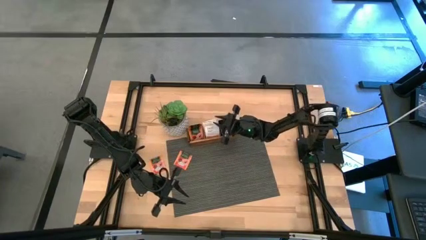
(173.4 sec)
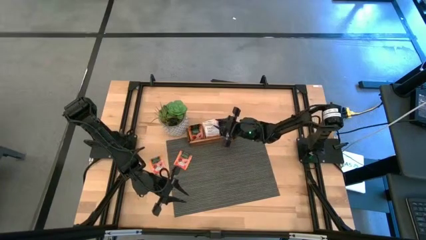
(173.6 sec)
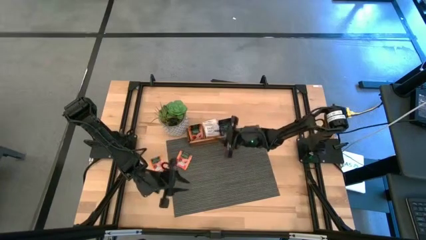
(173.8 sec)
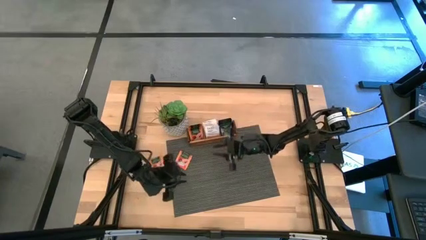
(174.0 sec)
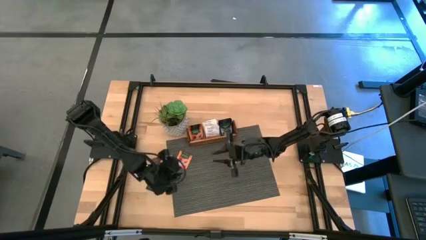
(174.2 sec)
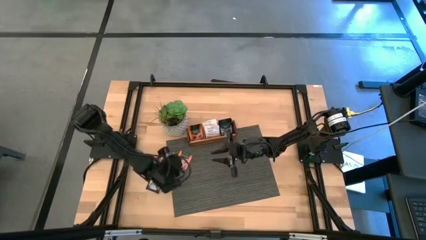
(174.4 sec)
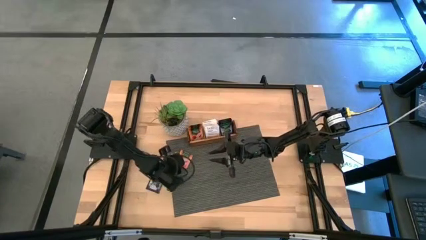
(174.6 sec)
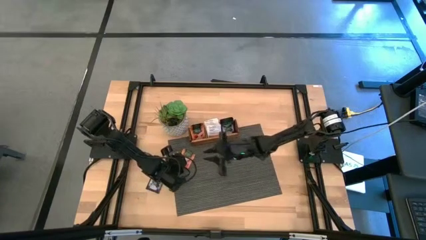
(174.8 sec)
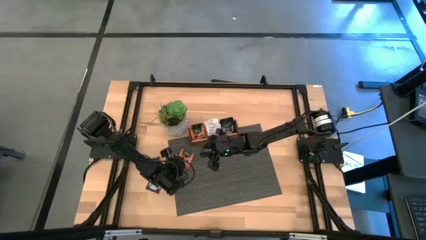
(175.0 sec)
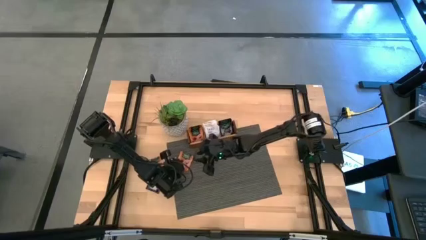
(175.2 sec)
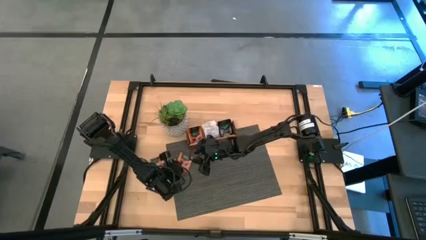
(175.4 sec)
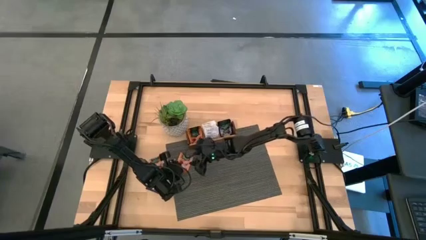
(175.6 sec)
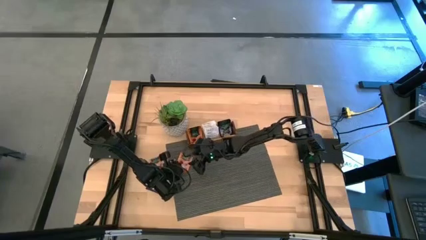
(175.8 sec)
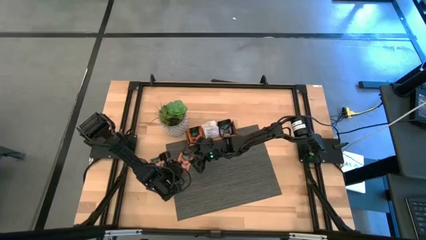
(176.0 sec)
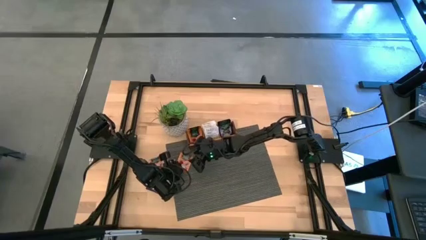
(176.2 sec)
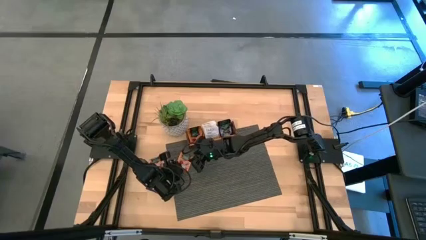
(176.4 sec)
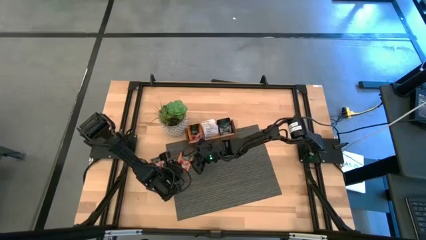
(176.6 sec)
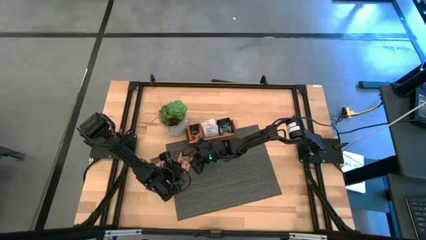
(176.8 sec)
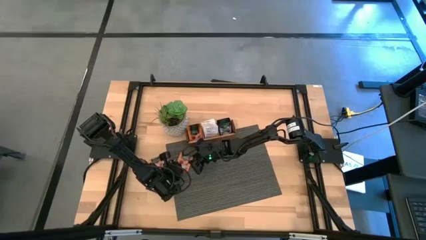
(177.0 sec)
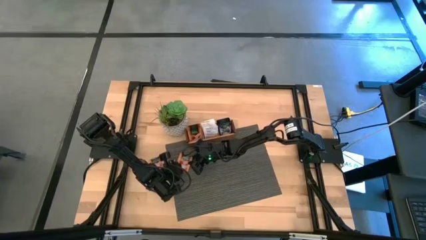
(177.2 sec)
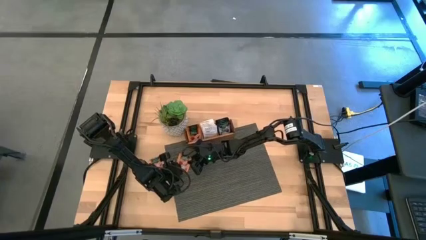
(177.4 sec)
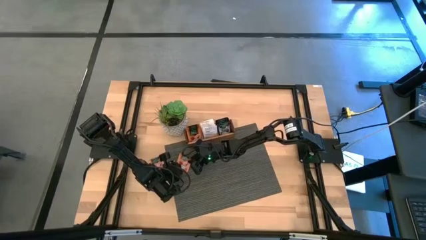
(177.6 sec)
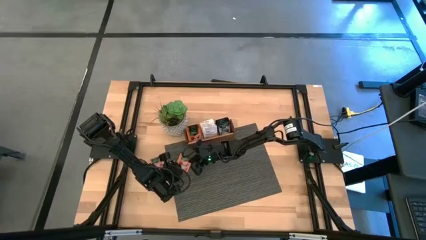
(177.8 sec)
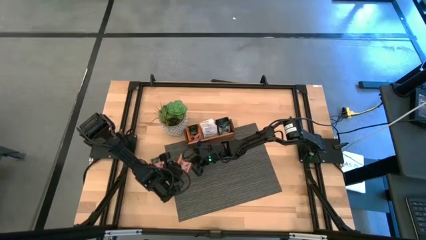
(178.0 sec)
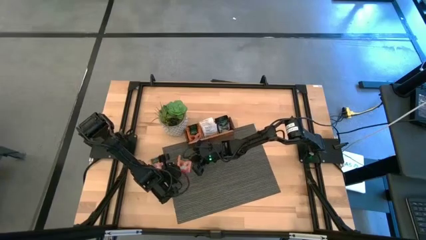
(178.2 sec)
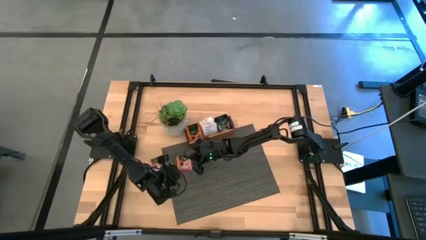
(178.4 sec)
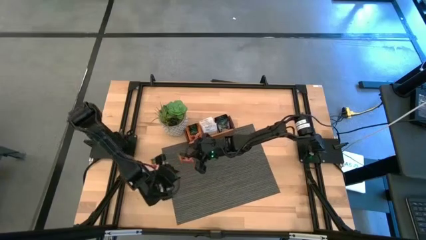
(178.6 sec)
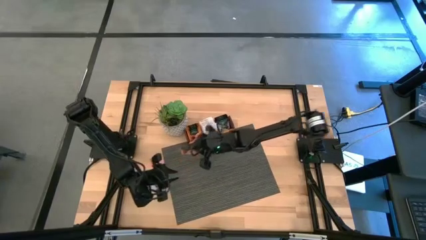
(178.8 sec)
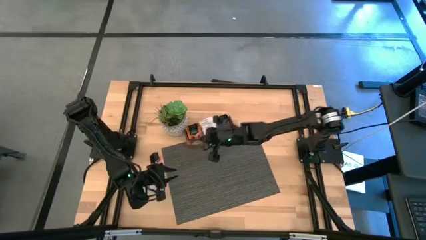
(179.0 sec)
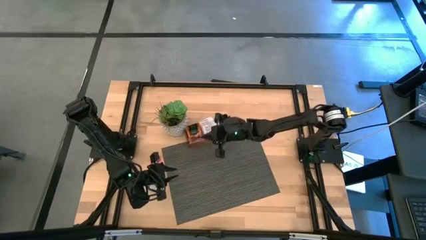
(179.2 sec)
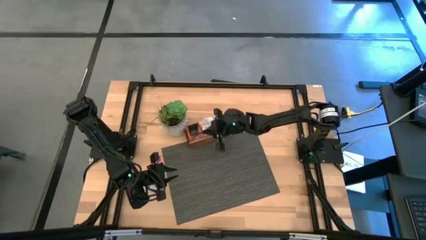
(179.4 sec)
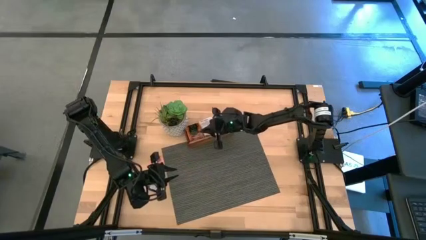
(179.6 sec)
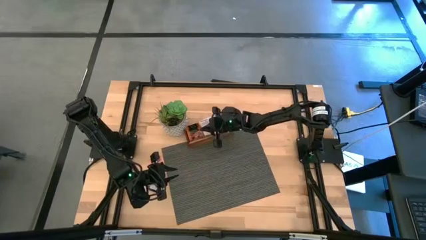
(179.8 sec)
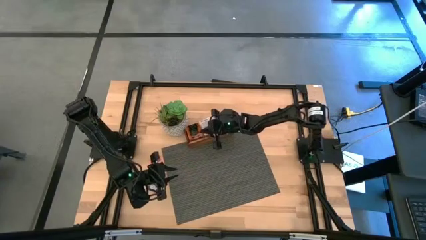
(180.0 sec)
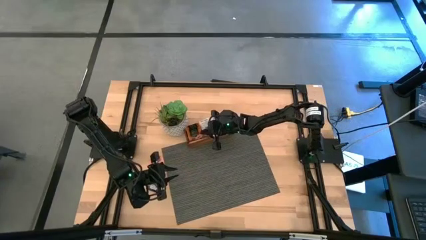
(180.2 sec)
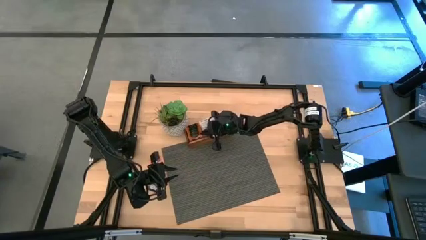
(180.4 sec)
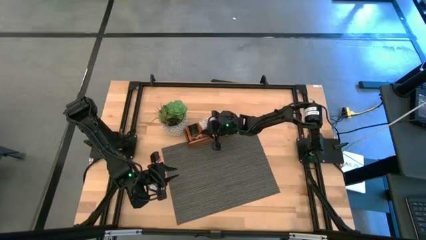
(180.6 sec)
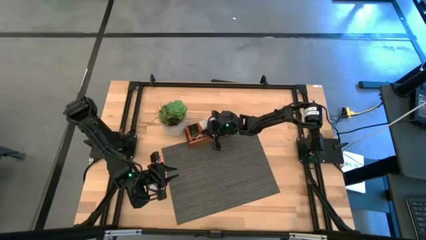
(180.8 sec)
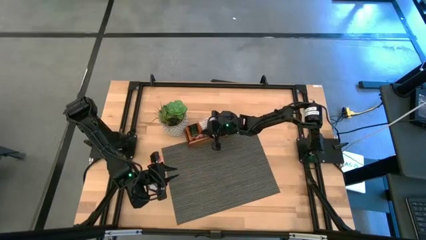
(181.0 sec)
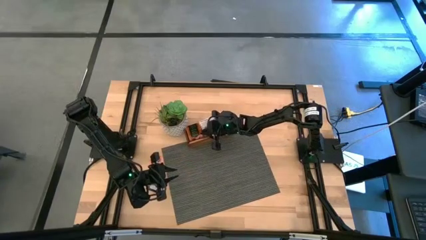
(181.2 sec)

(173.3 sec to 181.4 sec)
Task: Pick & Place Tea
Put the right orange tea bag into the left slot of the wooden organizer

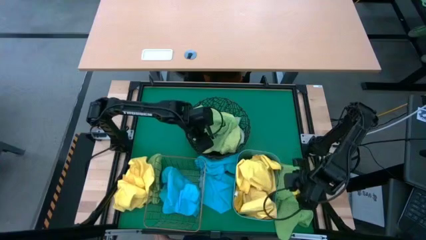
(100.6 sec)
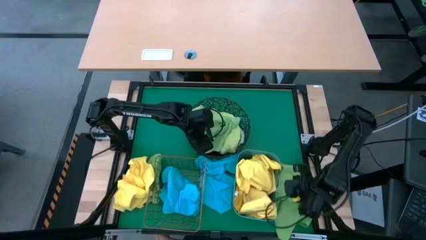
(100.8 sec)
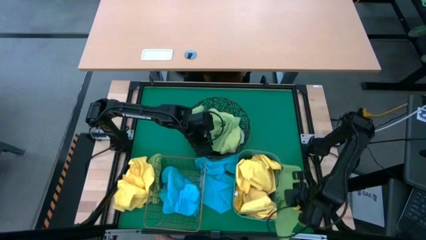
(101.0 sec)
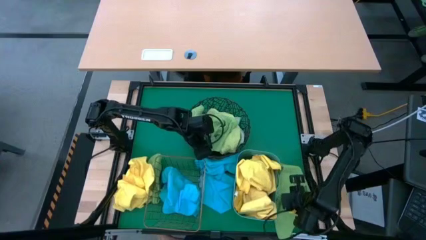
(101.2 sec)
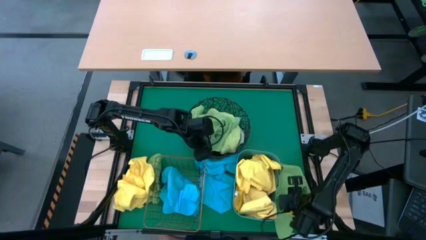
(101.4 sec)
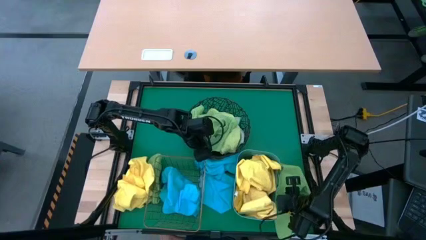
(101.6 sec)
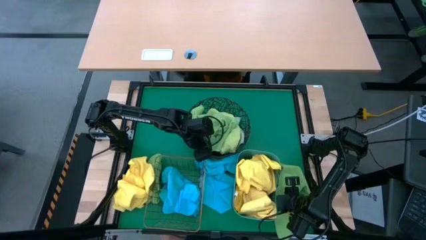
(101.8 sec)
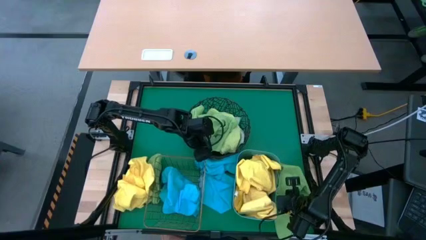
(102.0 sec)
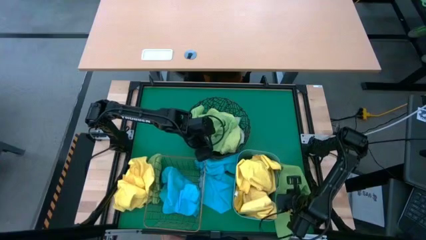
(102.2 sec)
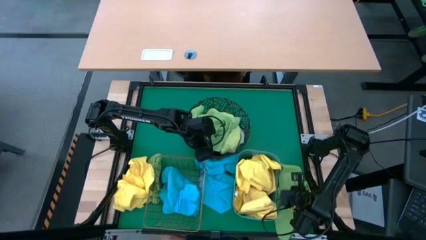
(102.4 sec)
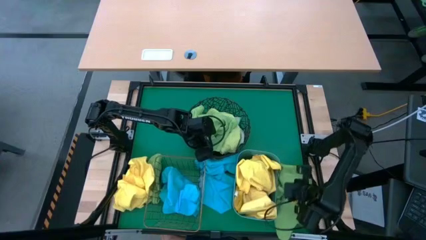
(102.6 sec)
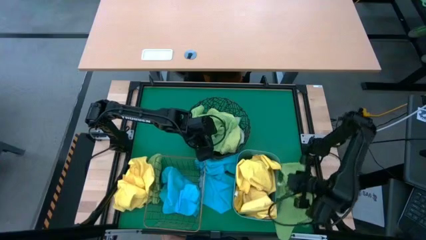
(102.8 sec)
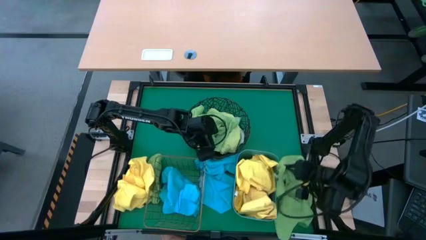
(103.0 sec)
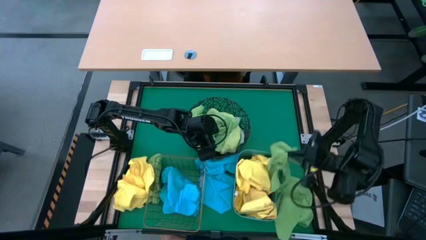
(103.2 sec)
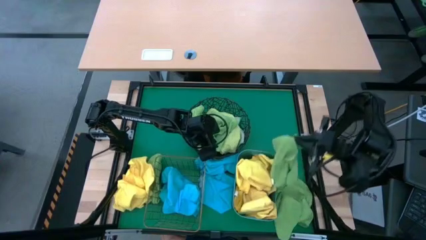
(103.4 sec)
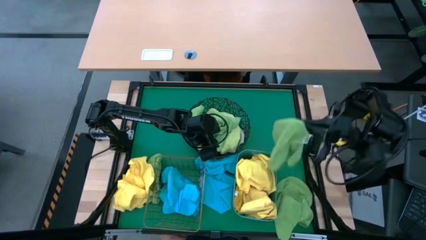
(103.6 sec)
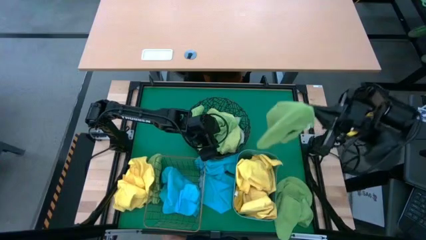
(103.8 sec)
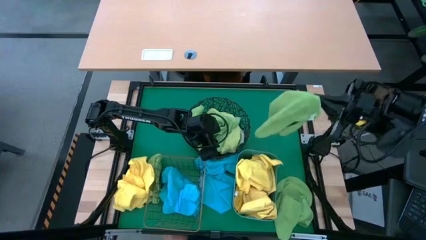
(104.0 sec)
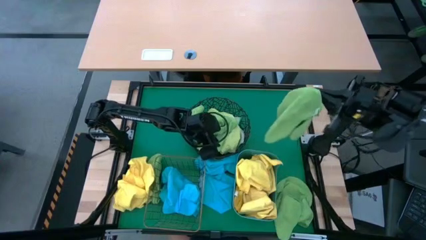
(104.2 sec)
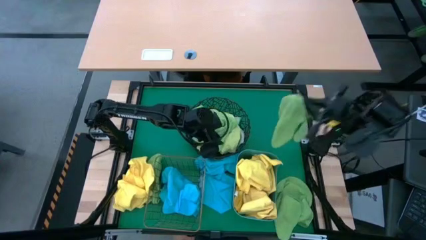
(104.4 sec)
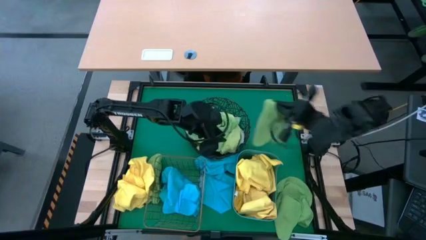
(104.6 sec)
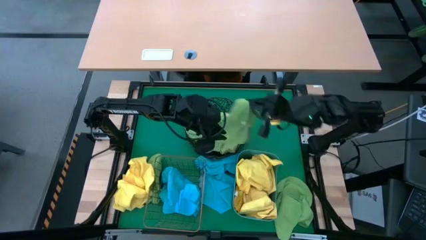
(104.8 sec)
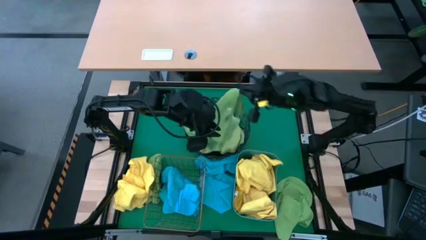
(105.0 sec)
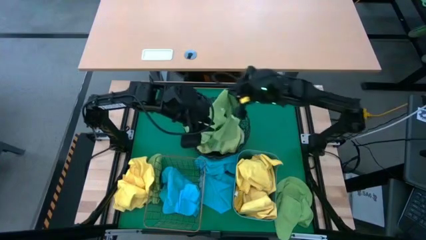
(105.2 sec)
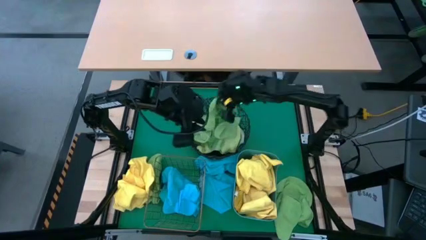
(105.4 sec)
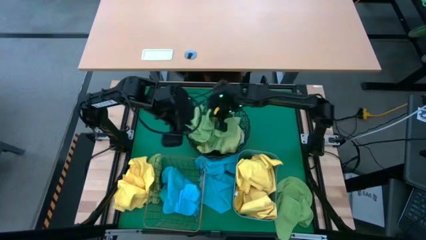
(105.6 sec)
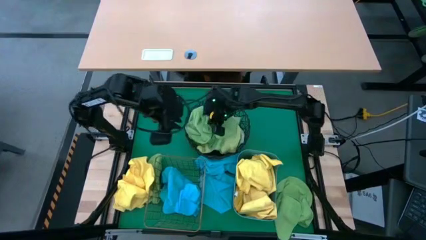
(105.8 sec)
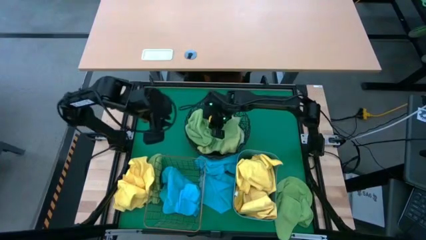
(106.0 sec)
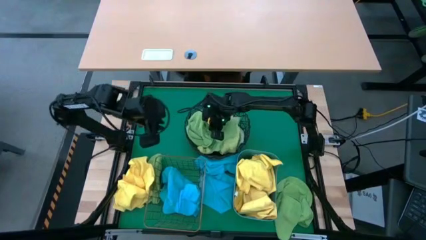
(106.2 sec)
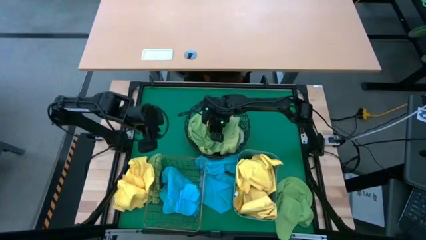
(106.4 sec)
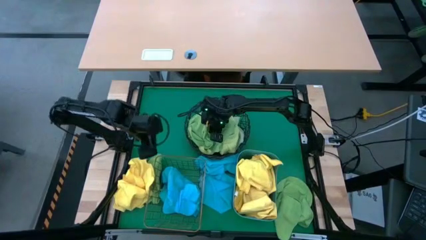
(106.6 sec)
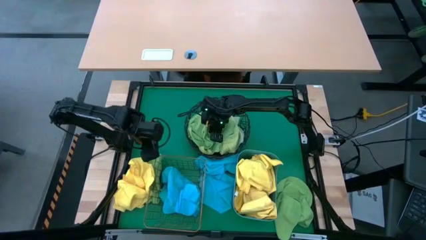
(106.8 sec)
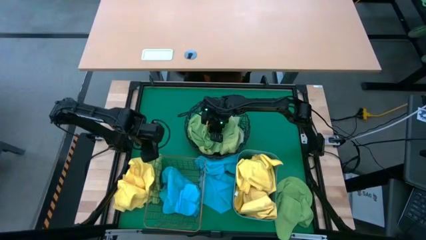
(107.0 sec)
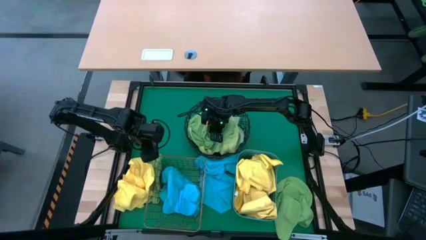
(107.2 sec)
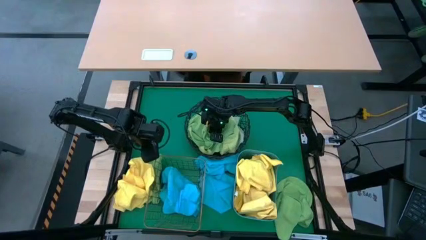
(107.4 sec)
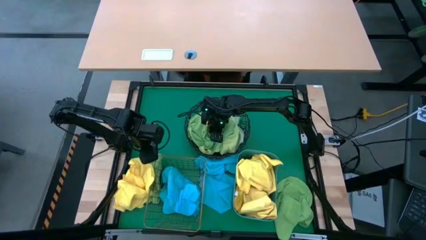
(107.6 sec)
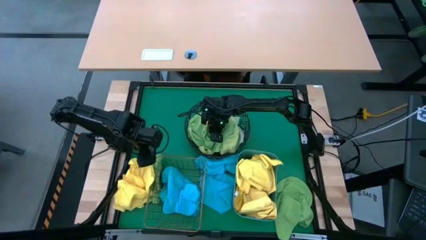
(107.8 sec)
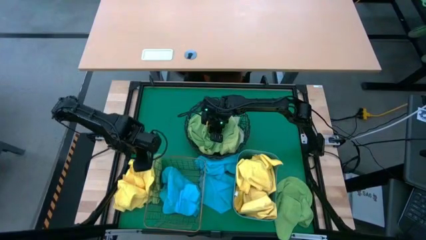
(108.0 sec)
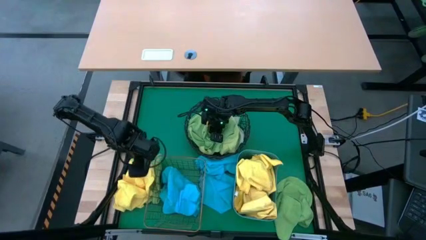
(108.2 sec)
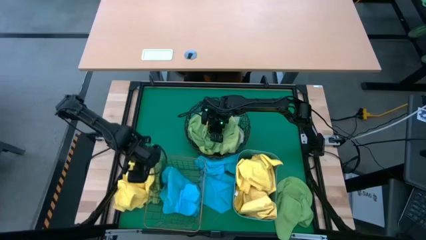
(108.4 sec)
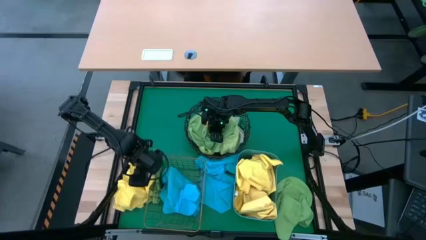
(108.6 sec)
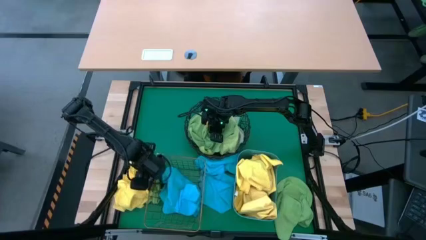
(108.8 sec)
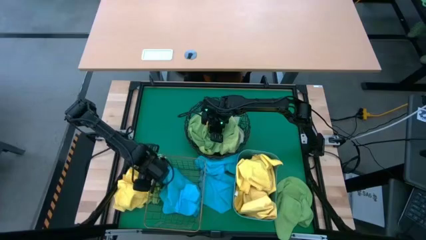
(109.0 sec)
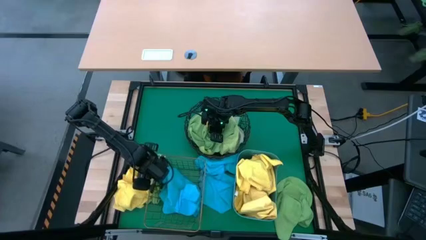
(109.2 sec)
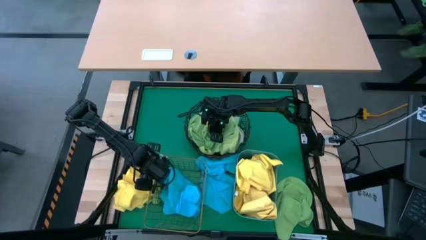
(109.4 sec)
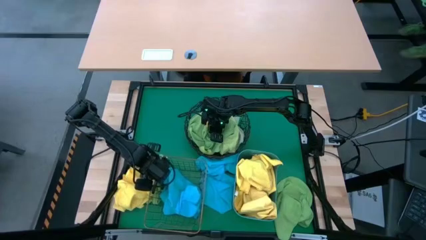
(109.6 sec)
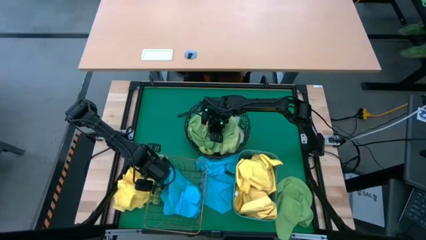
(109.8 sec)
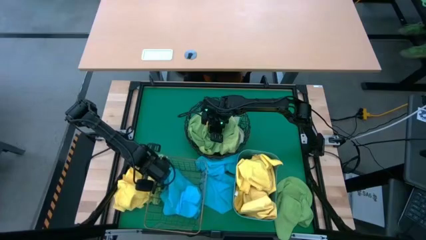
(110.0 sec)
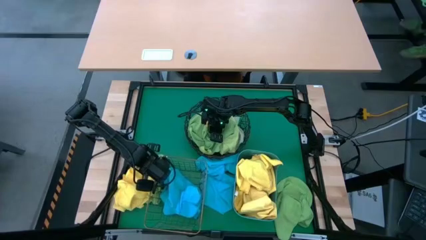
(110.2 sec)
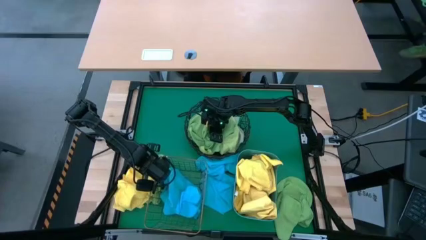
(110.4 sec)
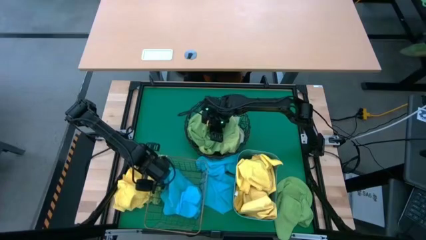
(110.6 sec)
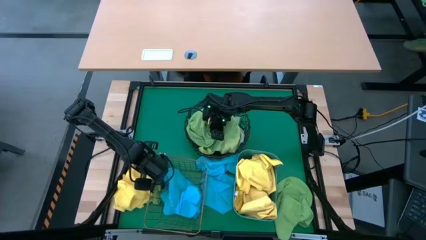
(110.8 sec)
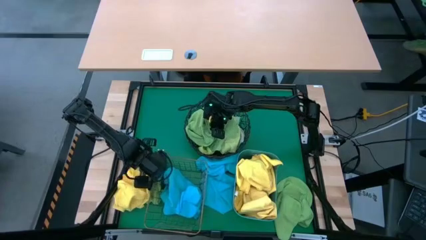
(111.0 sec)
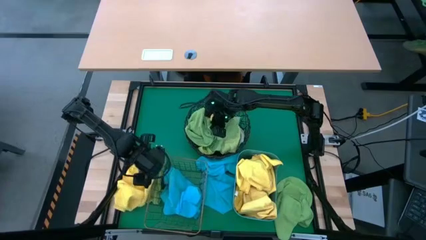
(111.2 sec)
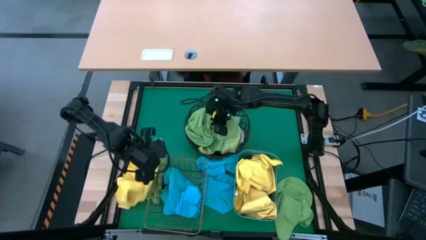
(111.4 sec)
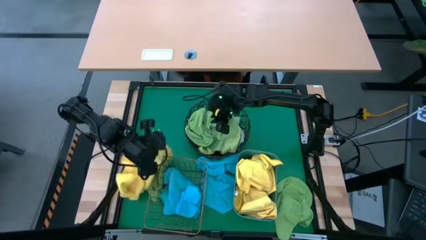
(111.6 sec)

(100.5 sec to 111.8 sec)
Task: Sort microfiber towel by color & place in baskets
Put the green microfiber cloth into the round wire basket
